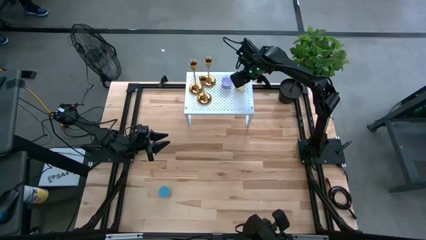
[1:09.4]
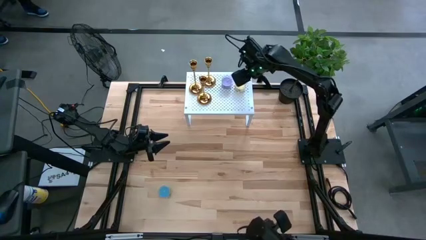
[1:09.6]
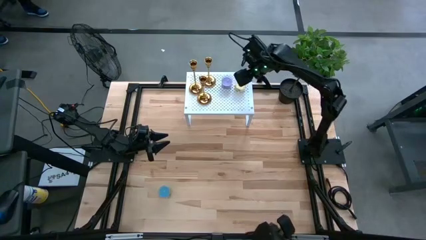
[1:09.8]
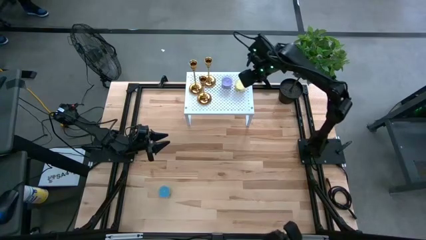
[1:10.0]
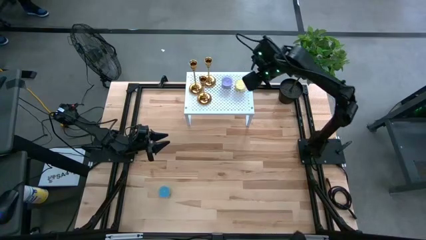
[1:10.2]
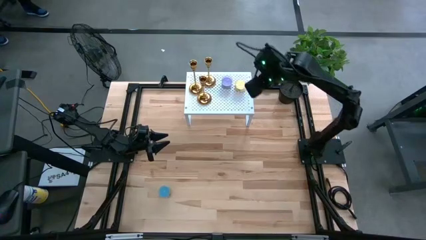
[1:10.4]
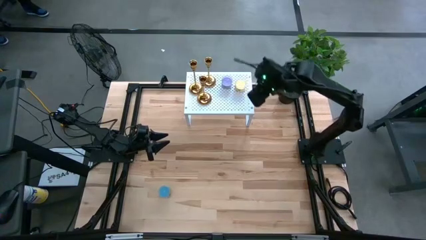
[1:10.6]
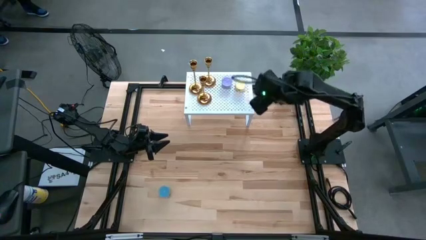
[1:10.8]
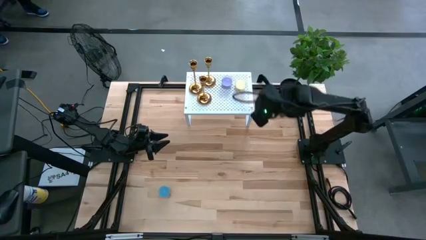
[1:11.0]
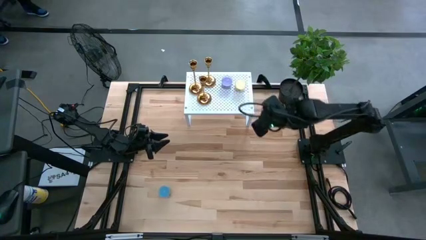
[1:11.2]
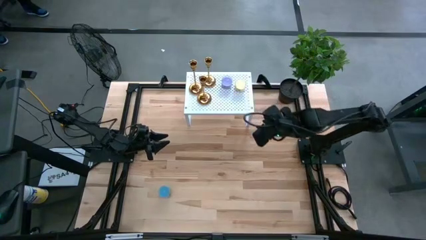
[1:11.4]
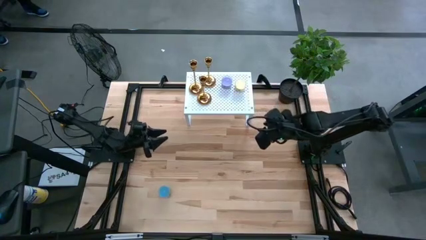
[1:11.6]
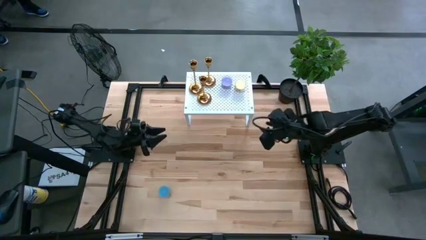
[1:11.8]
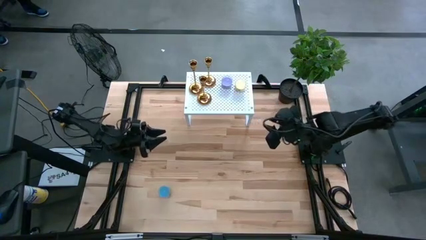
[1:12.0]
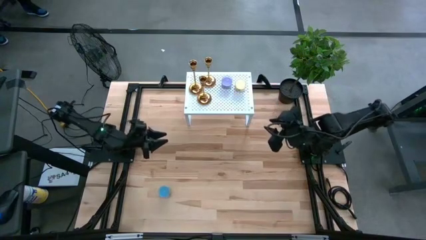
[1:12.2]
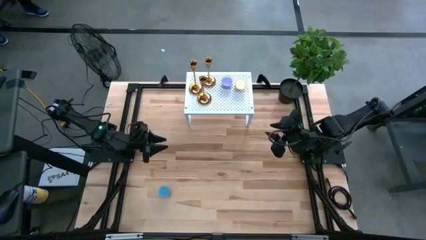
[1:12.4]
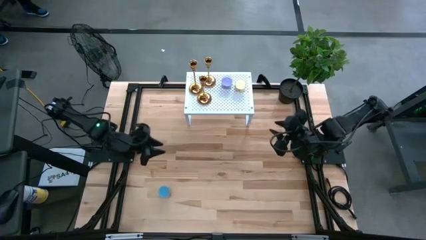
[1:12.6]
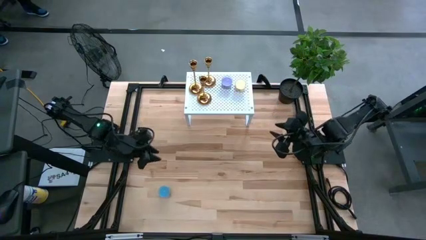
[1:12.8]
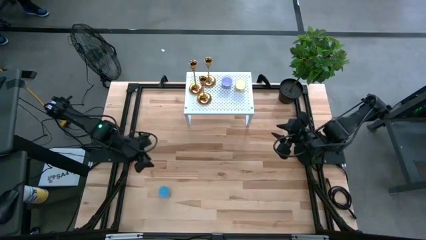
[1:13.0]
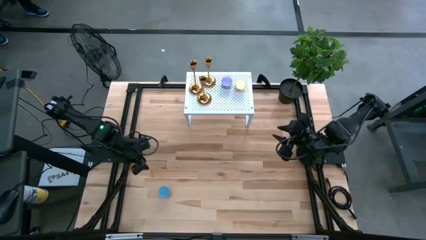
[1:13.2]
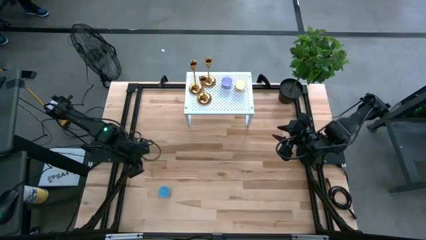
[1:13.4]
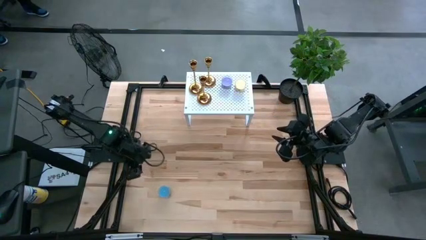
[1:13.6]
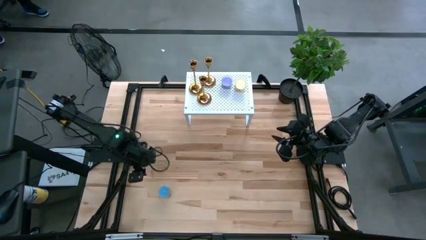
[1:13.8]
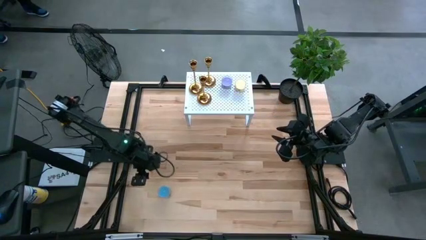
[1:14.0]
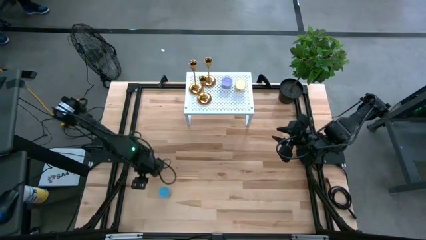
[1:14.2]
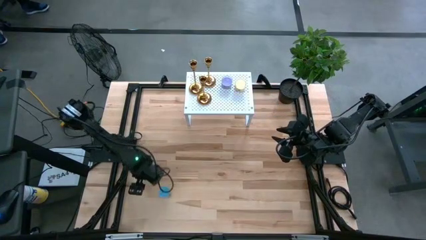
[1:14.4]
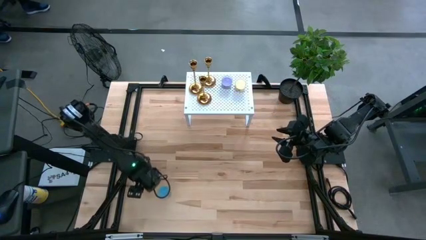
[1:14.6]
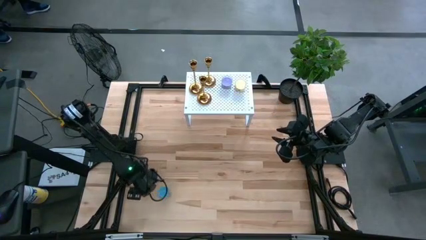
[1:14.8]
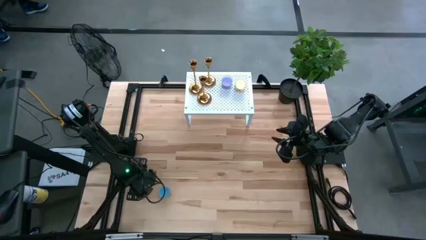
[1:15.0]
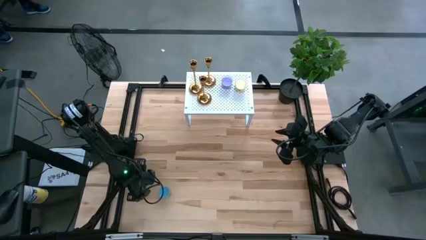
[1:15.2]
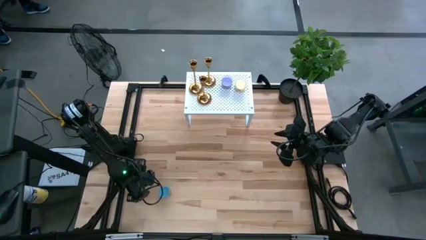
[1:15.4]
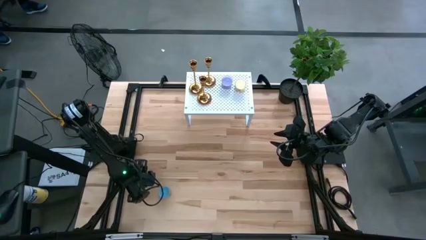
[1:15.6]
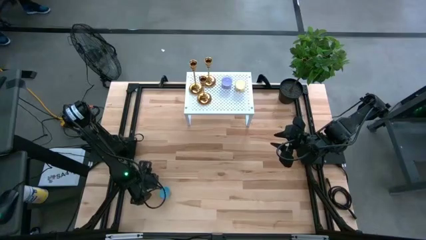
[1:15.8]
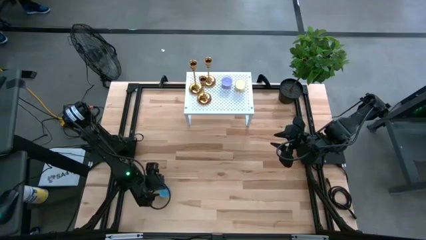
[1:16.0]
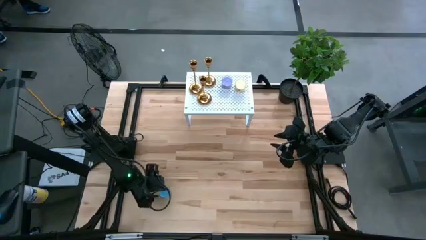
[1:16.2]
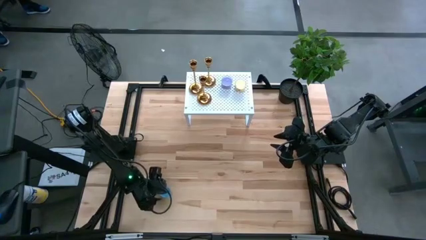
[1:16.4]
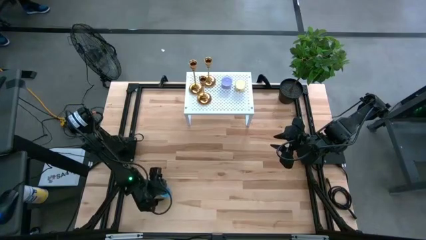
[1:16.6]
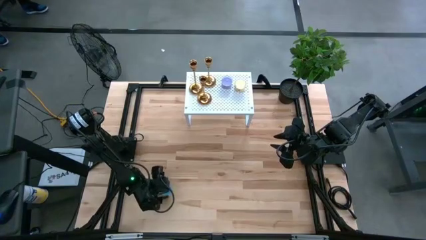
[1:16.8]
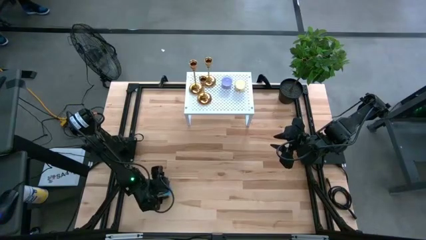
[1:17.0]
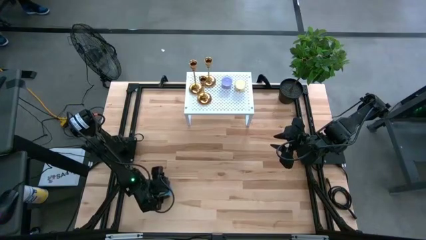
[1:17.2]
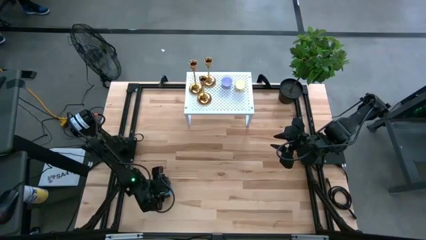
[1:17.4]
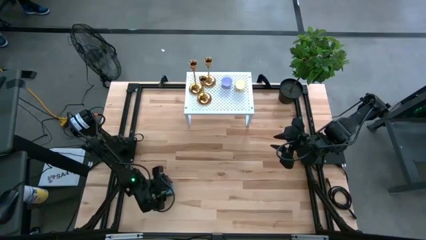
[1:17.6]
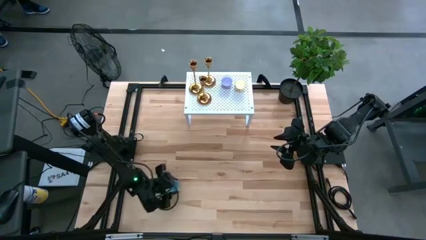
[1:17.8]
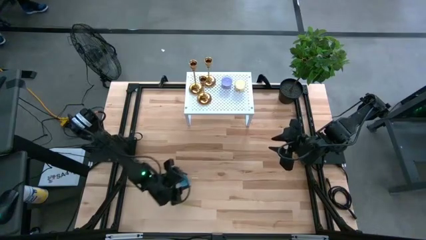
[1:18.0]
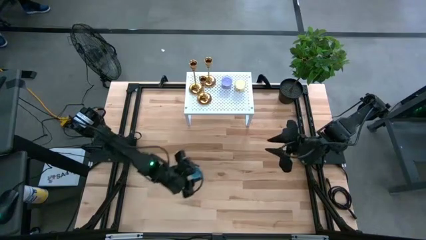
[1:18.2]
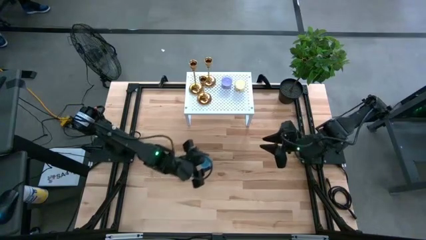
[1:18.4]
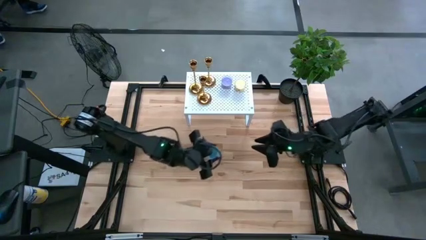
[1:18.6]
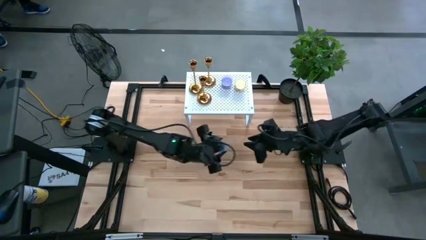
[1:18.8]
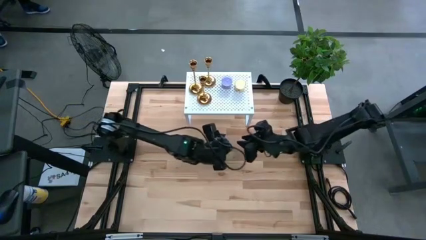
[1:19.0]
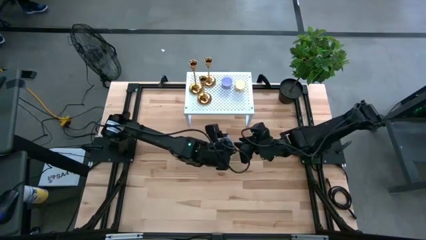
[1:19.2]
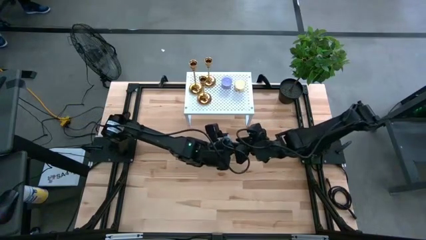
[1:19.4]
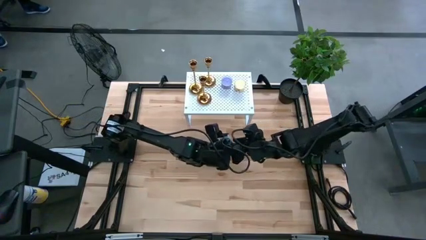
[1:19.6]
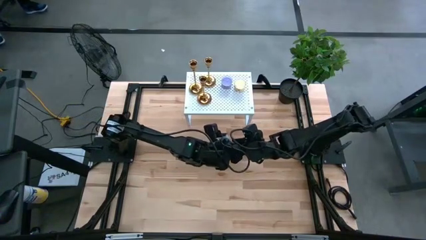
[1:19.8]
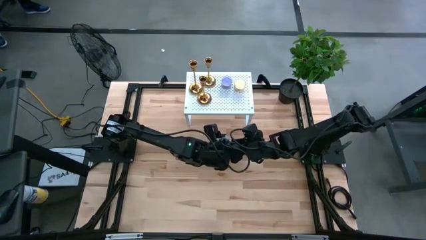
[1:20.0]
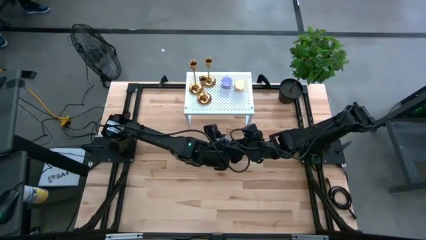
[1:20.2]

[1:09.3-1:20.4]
Task: Pick & Place candle stick holders
Put the blue scented candle on the shelf

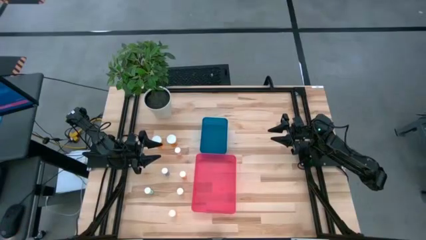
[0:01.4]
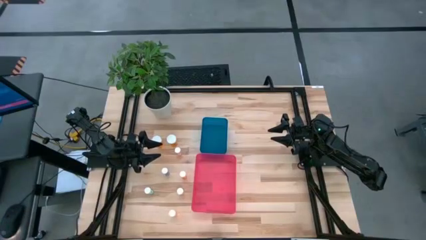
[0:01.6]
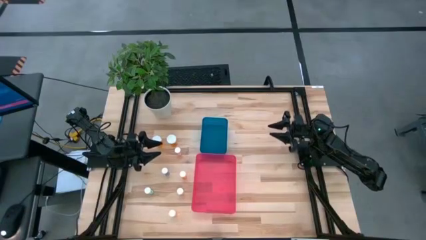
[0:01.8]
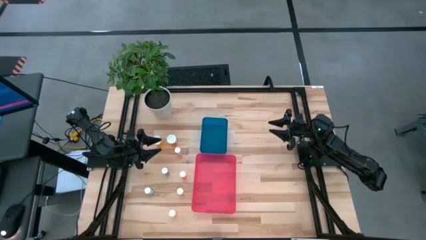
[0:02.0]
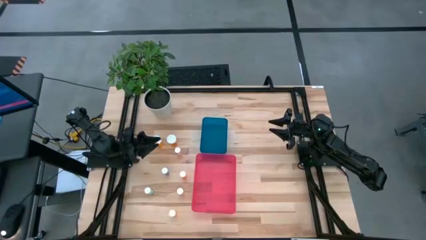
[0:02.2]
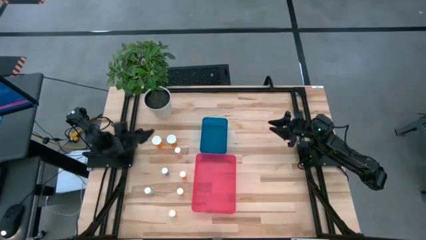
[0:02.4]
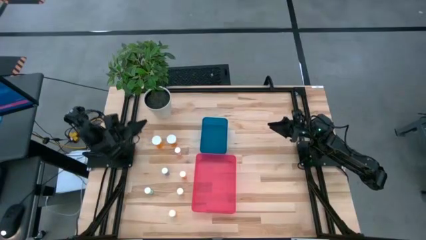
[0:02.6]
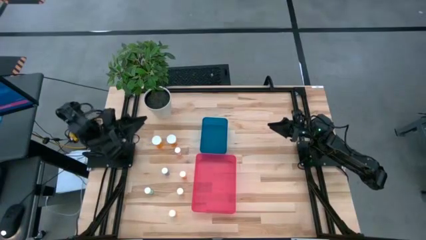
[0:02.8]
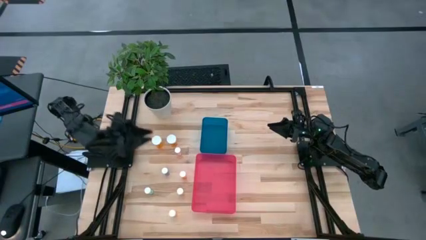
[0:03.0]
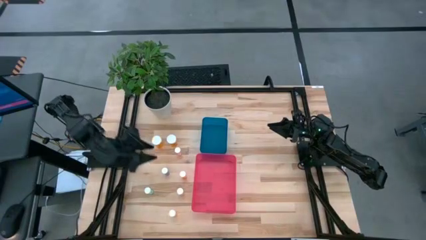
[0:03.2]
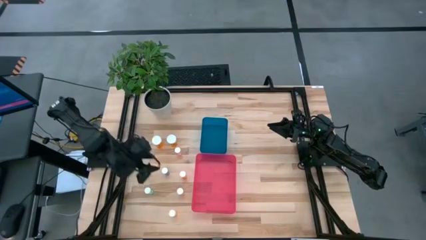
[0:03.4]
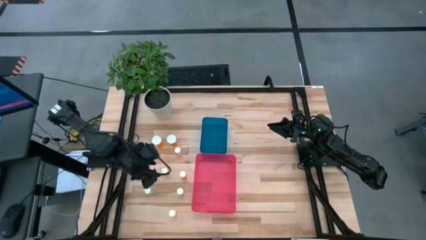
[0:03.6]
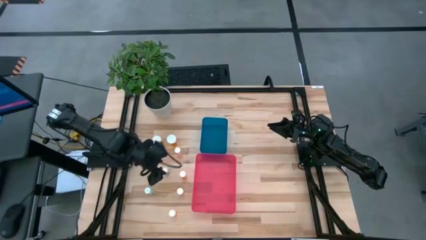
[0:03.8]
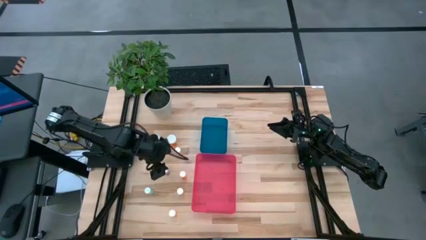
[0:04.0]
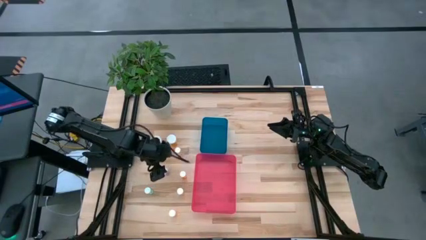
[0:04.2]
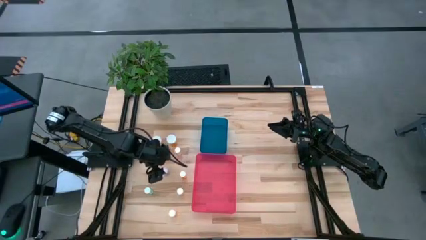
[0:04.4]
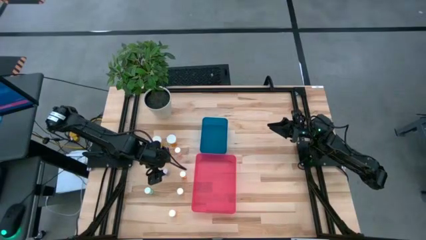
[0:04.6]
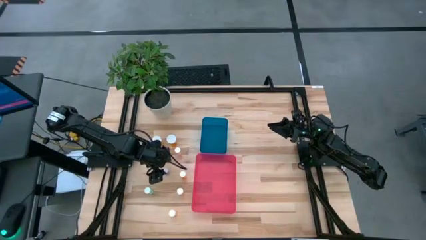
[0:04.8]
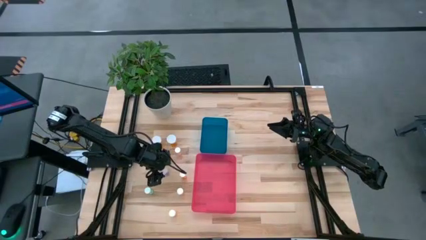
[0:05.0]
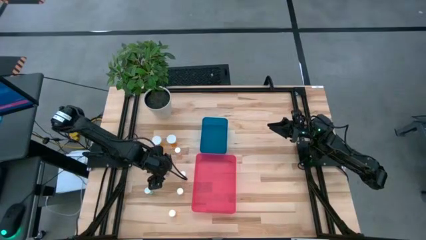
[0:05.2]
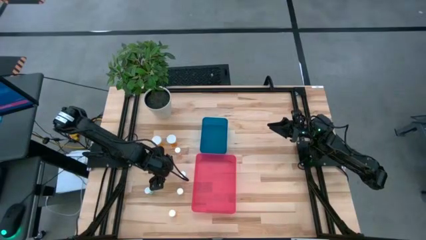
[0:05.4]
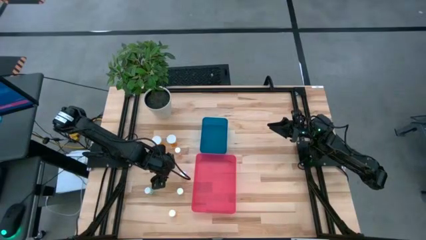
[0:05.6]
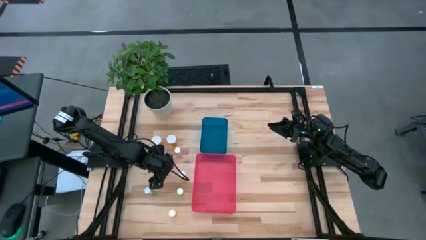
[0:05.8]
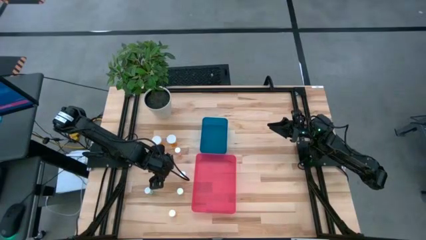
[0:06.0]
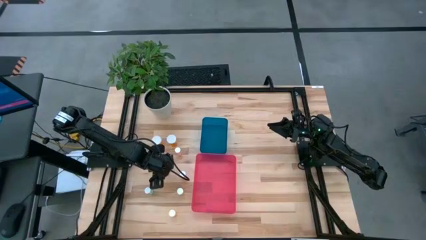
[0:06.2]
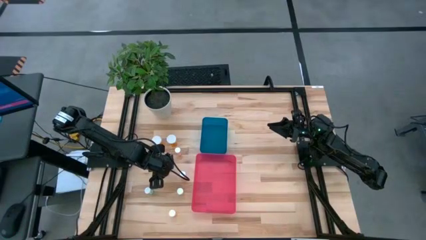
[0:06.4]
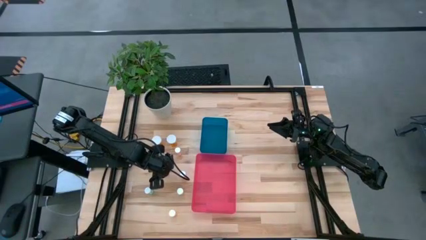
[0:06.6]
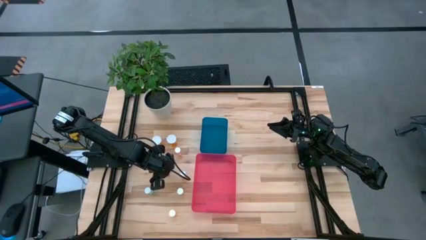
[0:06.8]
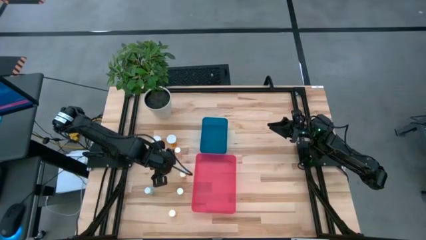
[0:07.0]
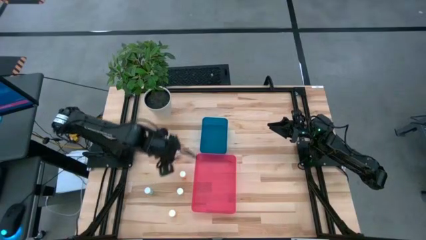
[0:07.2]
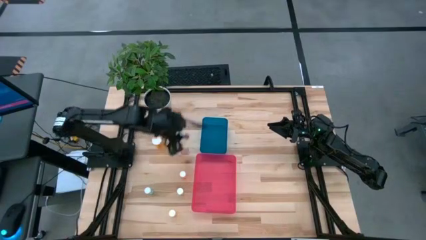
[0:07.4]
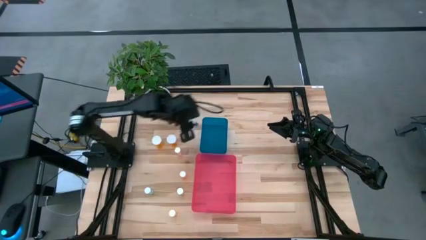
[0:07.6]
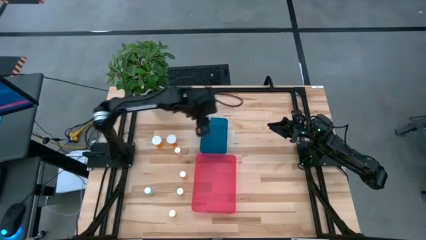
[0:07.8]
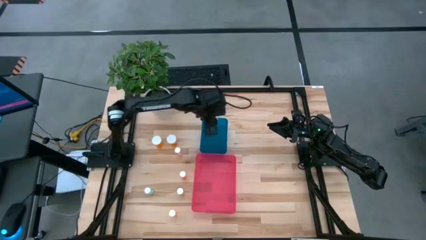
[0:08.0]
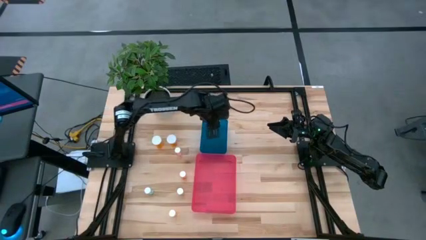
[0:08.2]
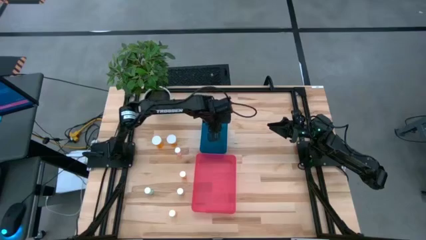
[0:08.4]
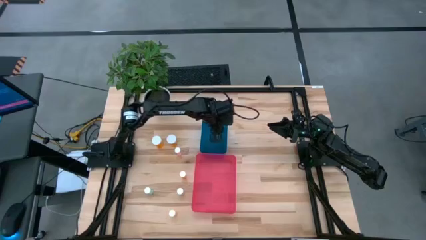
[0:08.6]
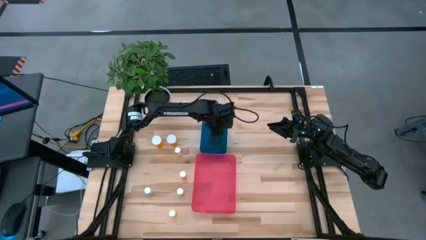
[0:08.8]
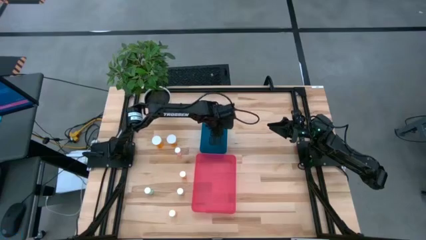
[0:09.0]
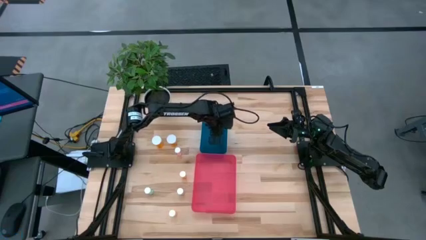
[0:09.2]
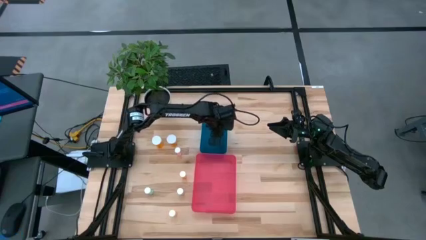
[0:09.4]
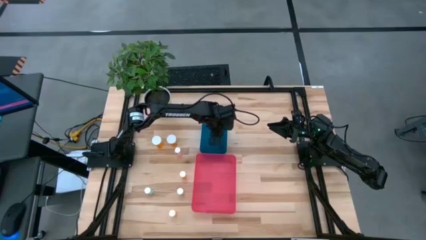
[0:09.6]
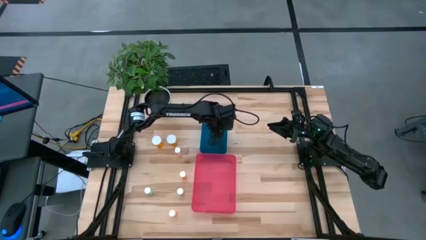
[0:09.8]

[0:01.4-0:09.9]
Task: Pick and place medicine bottles into bin by pill shape (circle, oval)
Put the blue capsule bottle into the blue bin
